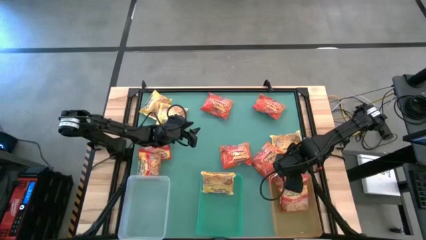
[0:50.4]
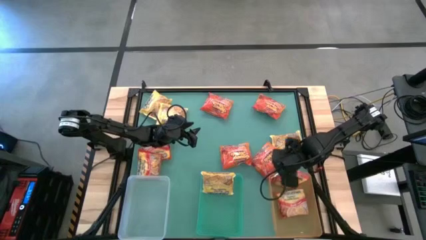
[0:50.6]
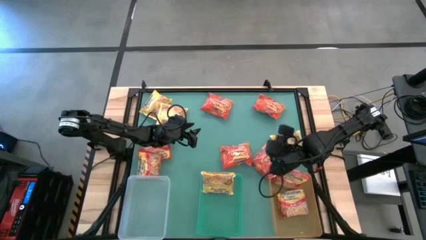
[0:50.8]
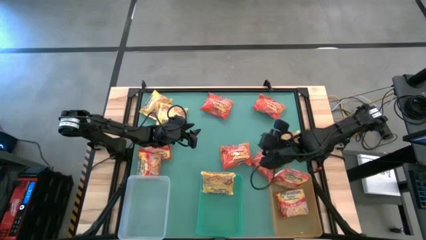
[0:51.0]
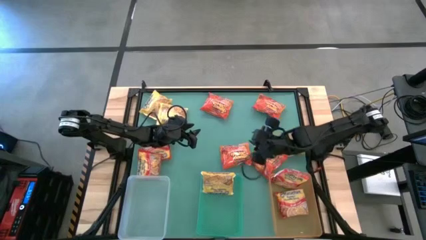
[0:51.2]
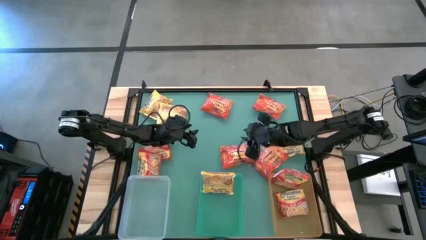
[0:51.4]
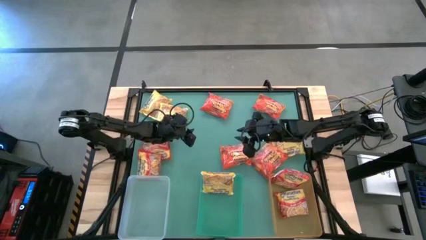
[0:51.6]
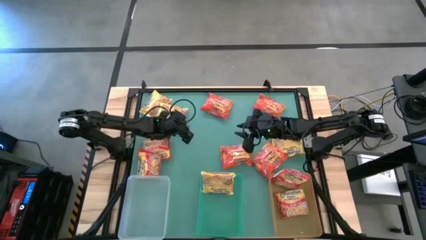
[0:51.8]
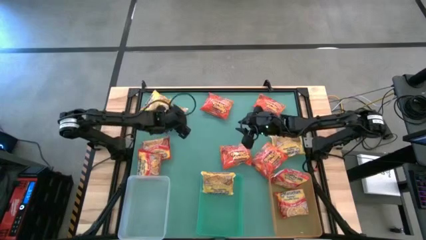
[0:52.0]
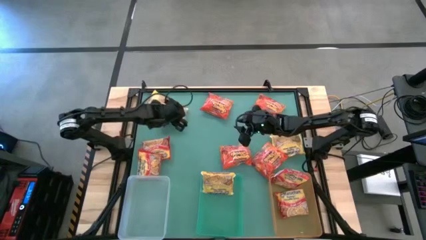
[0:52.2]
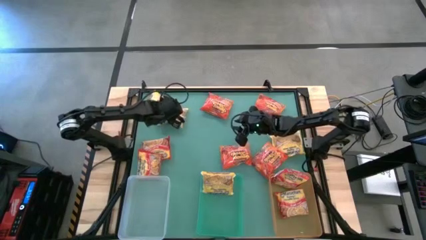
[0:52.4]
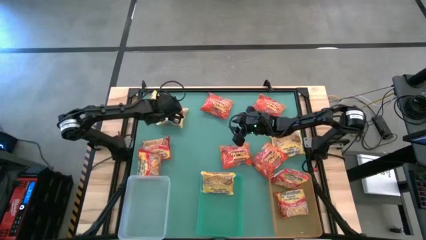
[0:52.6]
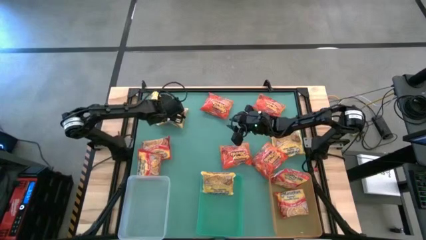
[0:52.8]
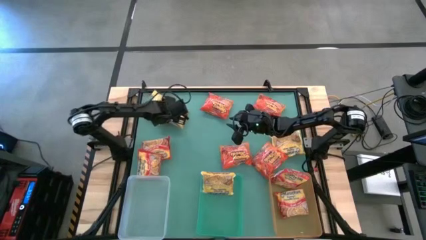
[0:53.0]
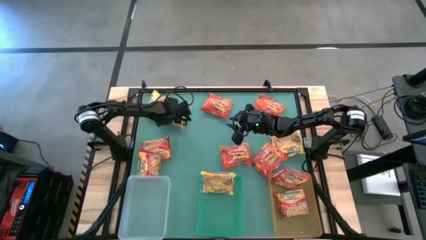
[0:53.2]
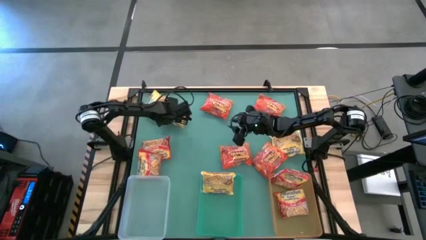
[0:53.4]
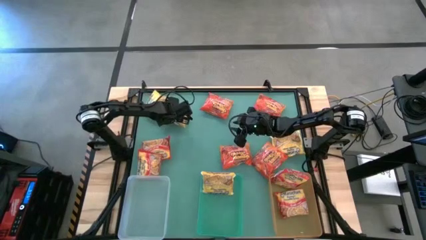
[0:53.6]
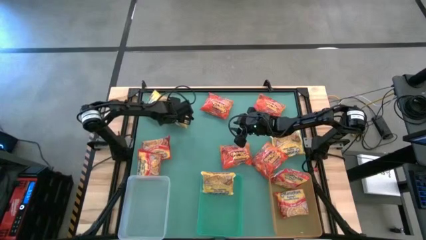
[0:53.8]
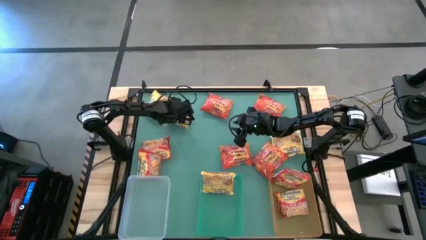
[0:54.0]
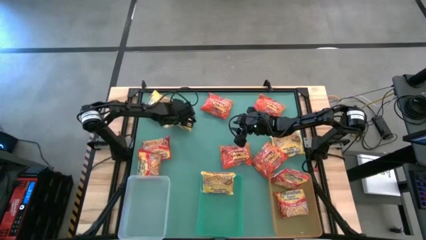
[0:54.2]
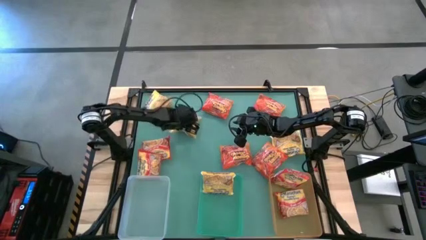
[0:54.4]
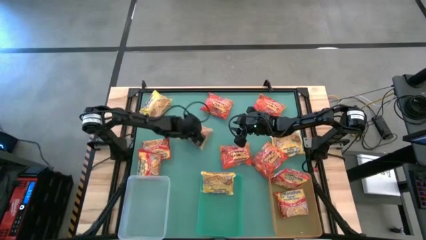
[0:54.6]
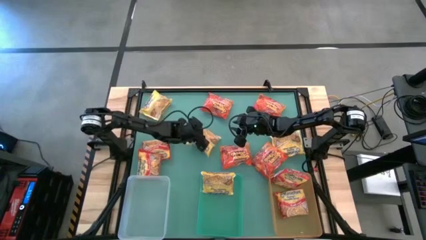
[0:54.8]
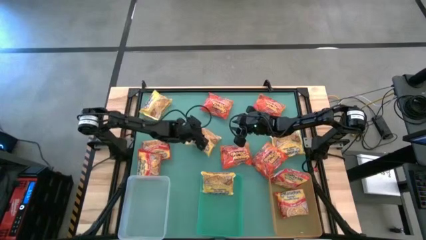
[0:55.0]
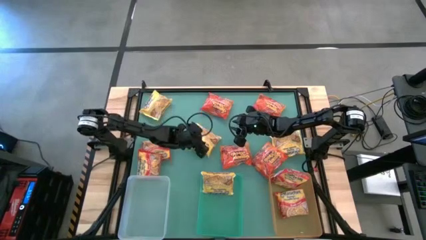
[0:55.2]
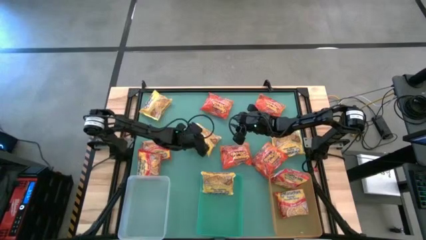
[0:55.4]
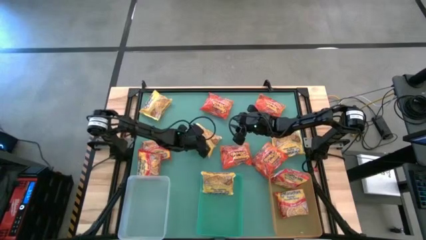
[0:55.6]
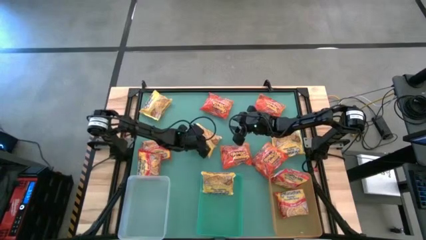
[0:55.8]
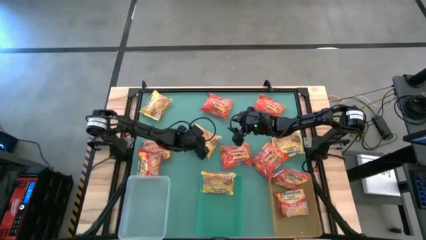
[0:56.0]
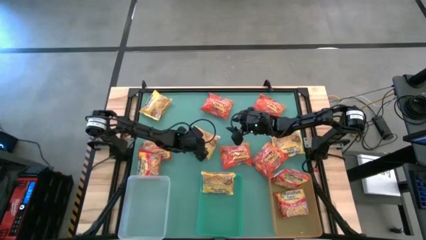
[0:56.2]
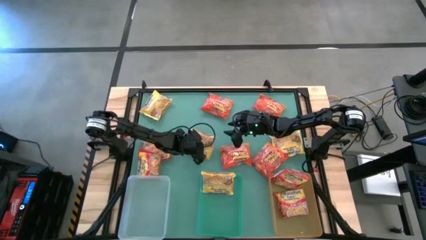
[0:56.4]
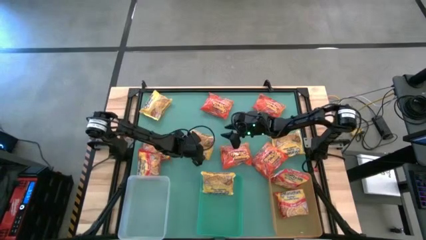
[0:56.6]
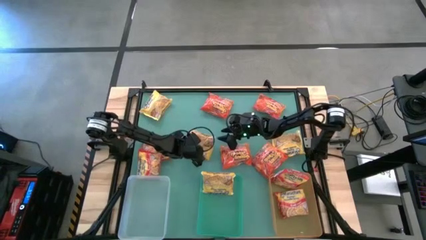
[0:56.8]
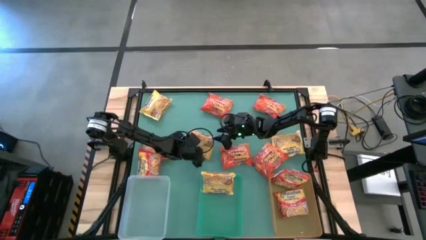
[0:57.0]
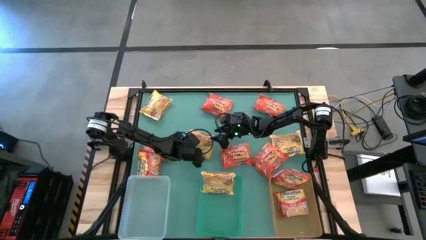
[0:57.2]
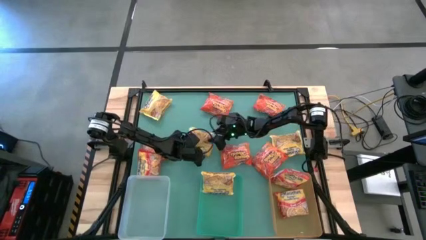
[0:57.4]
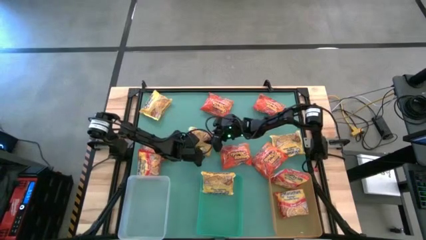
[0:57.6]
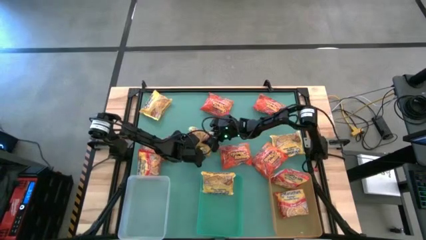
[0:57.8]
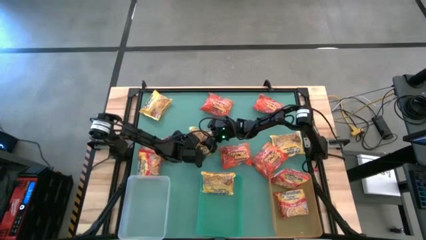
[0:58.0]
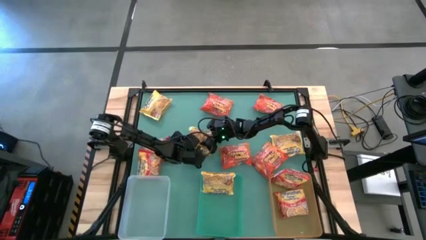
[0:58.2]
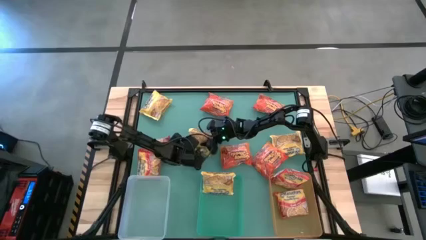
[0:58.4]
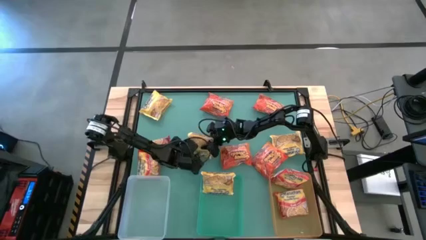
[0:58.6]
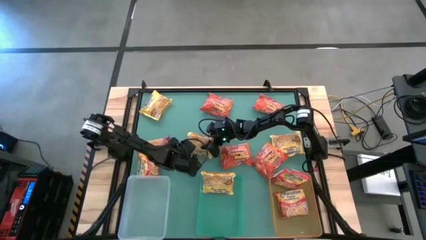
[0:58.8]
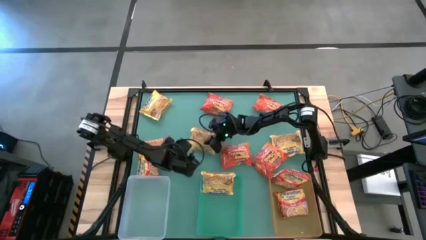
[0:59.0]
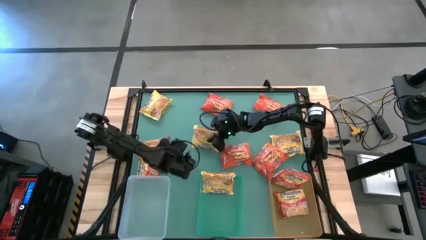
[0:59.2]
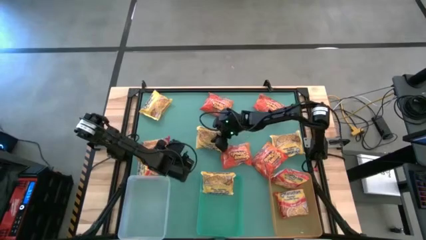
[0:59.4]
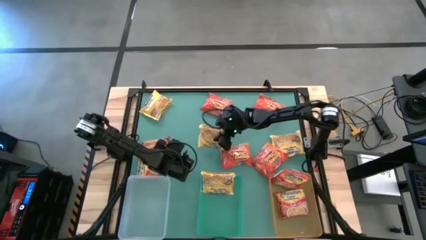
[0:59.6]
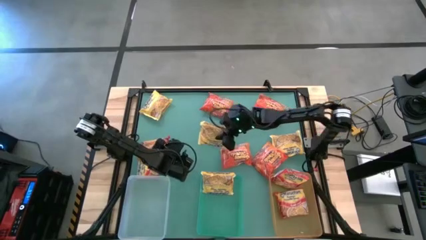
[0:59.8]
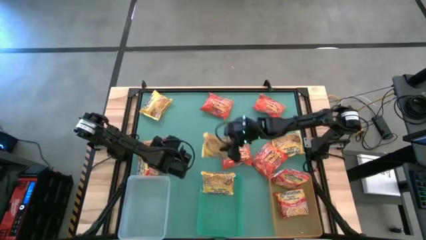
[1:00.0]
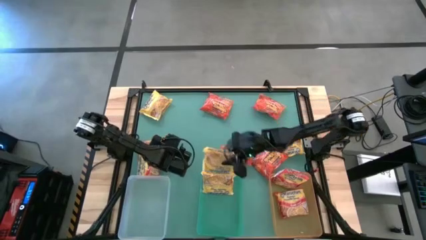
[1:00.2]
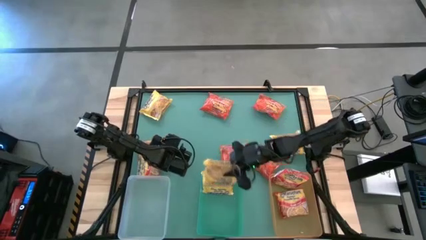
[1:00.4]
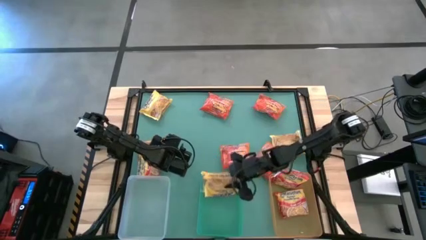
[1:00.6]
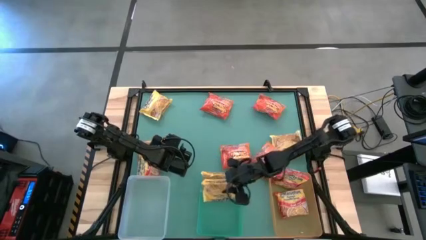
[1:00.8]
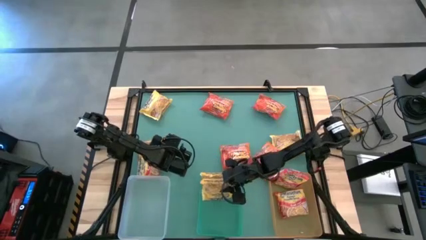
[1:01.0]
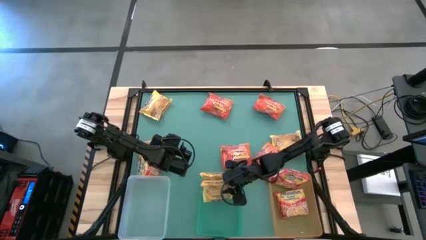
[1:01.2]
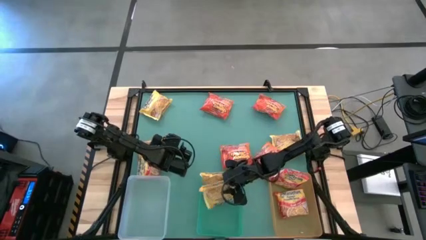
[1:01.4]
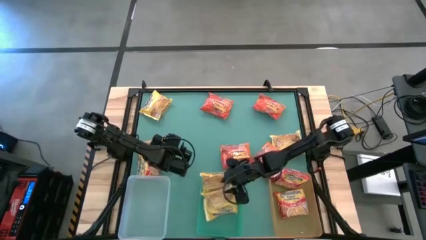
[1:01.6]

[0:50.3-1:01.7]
Task: Sort Maruchan noodles
Put the yellow noodle pack into the green bin
